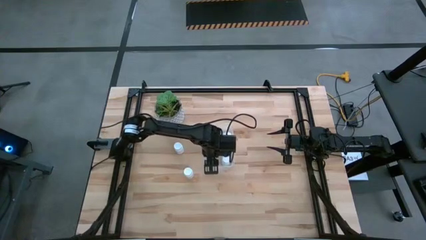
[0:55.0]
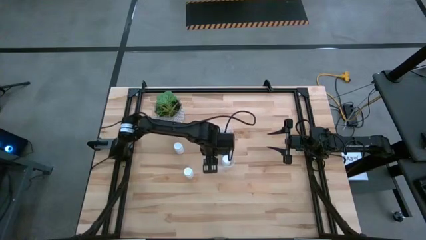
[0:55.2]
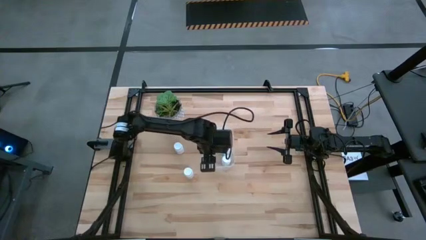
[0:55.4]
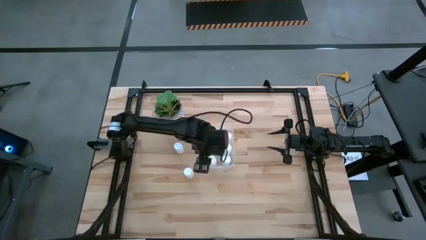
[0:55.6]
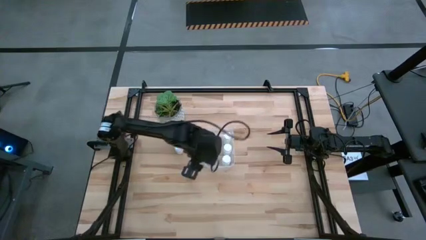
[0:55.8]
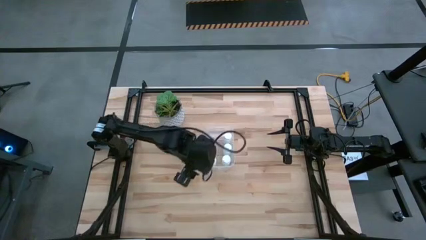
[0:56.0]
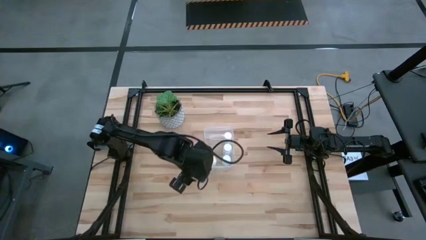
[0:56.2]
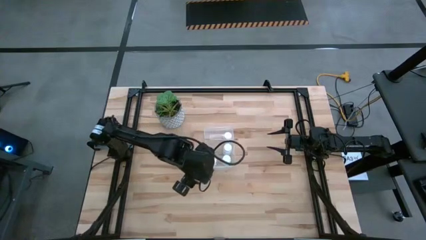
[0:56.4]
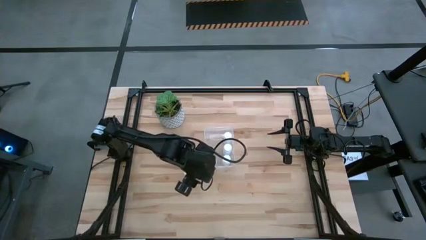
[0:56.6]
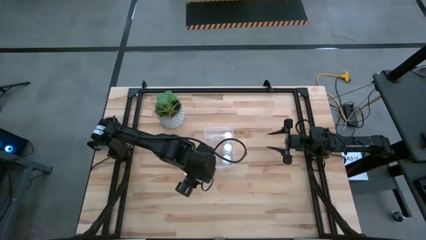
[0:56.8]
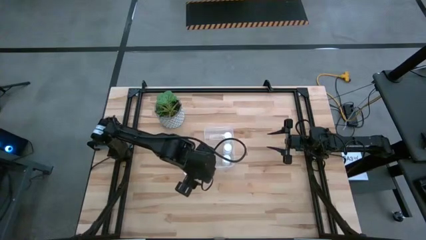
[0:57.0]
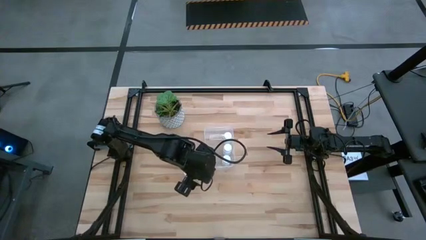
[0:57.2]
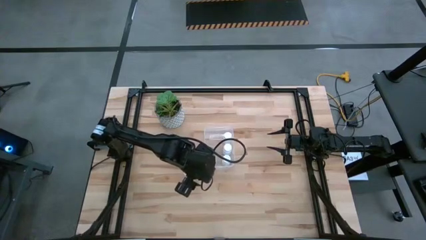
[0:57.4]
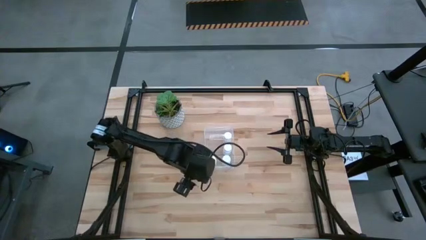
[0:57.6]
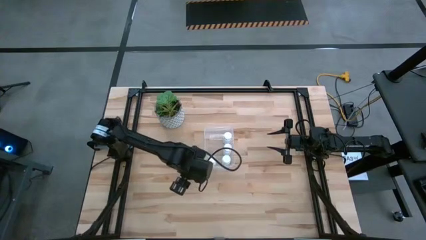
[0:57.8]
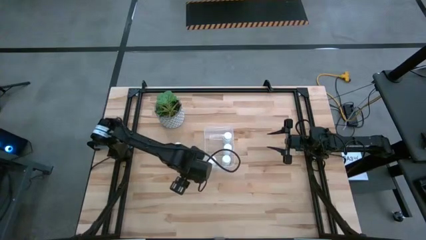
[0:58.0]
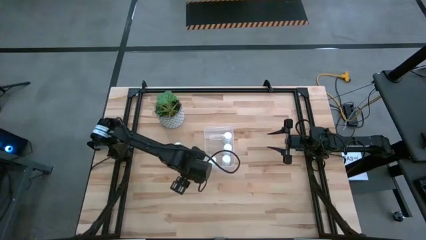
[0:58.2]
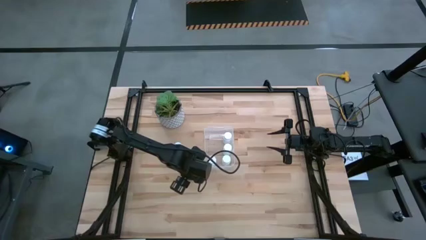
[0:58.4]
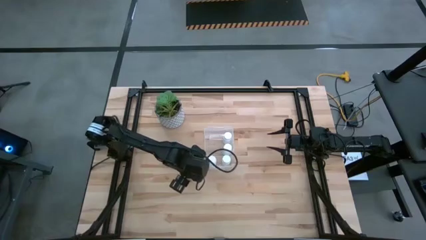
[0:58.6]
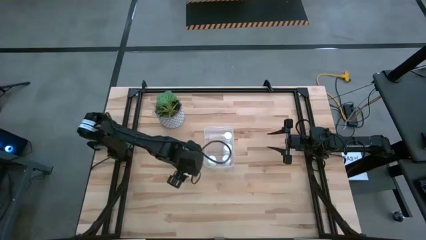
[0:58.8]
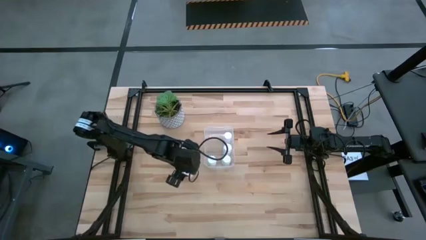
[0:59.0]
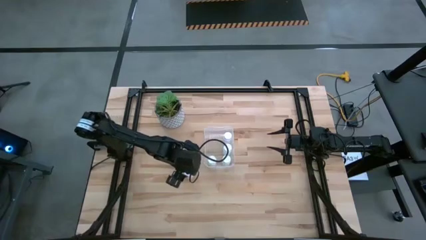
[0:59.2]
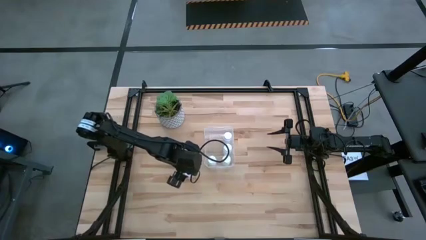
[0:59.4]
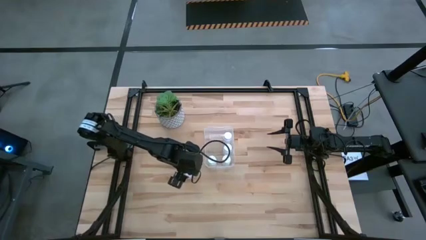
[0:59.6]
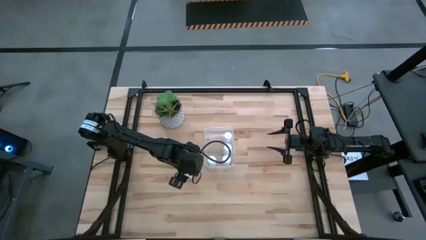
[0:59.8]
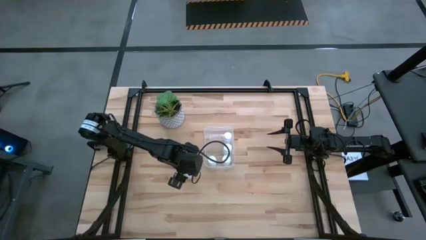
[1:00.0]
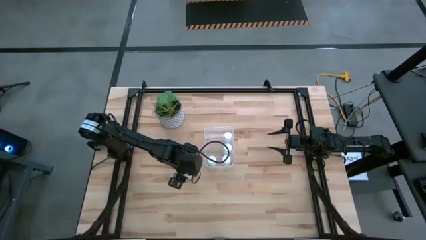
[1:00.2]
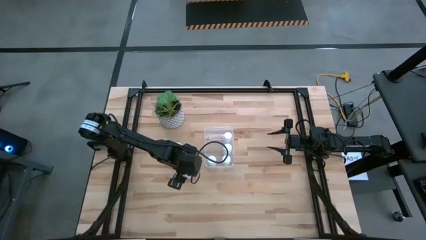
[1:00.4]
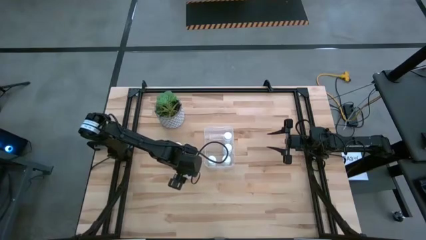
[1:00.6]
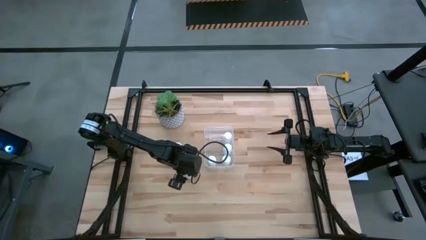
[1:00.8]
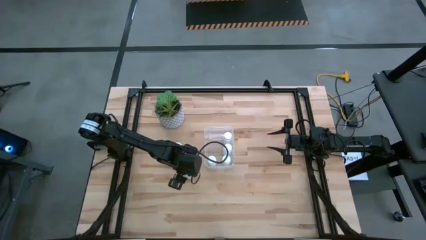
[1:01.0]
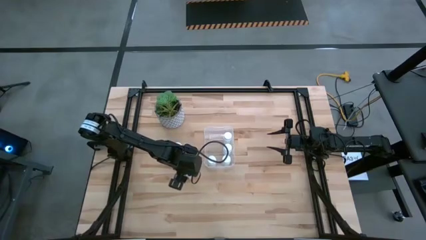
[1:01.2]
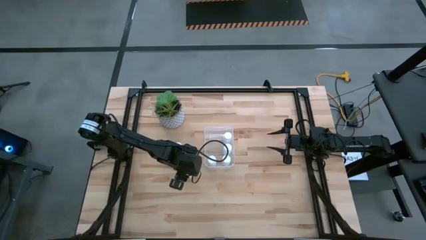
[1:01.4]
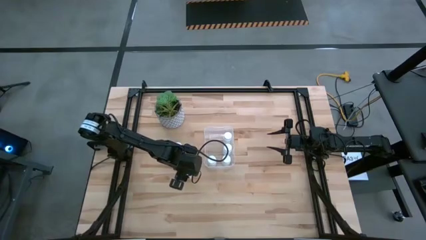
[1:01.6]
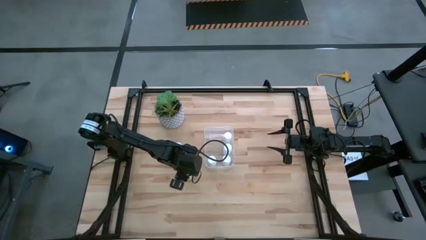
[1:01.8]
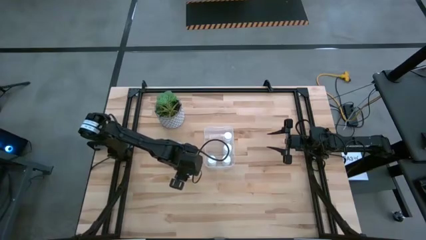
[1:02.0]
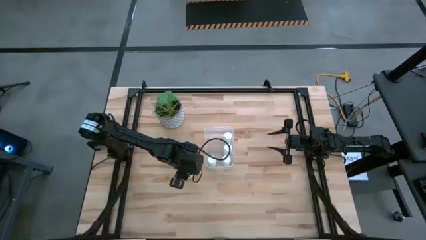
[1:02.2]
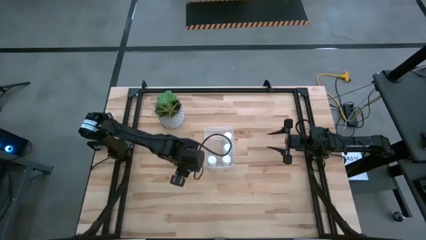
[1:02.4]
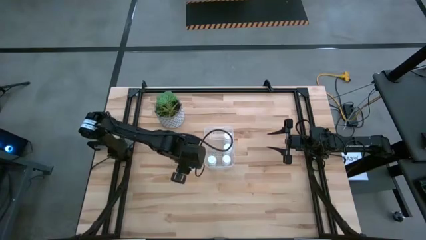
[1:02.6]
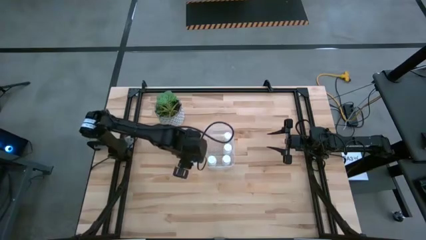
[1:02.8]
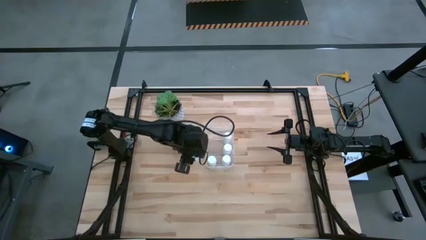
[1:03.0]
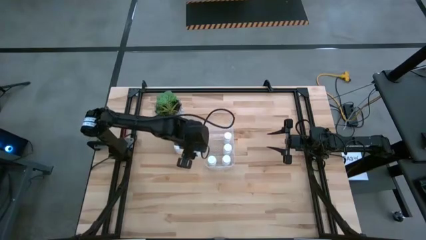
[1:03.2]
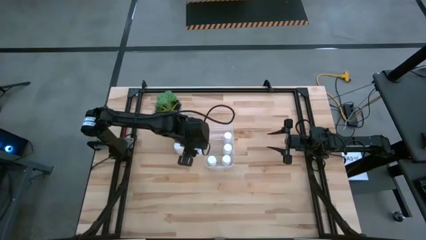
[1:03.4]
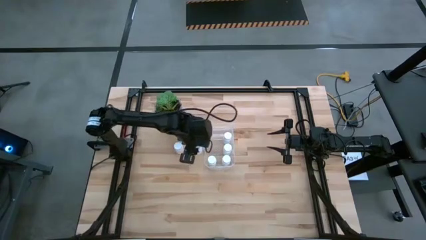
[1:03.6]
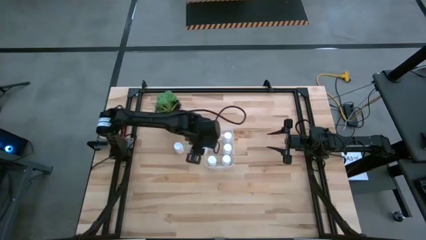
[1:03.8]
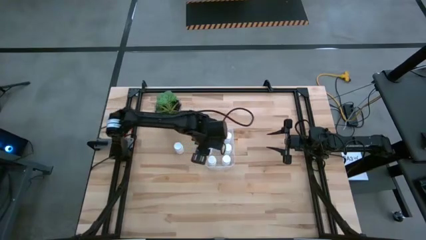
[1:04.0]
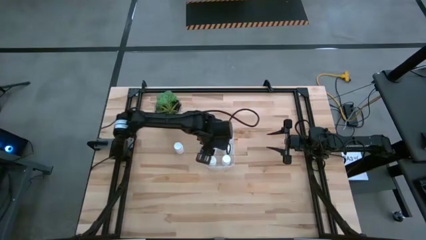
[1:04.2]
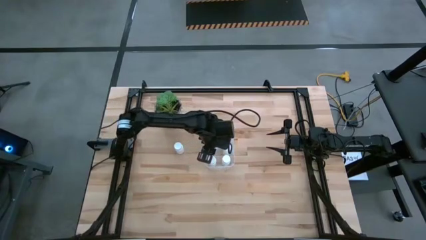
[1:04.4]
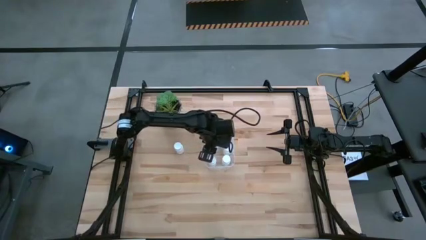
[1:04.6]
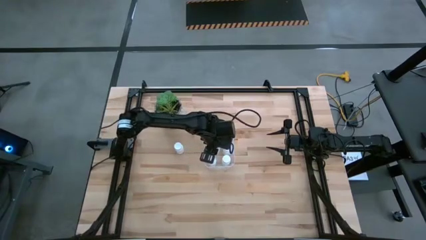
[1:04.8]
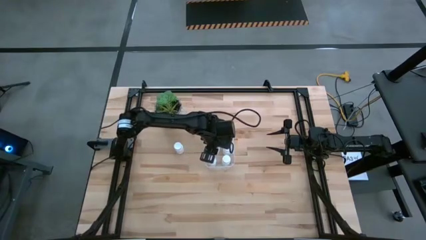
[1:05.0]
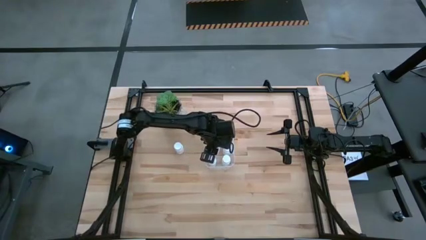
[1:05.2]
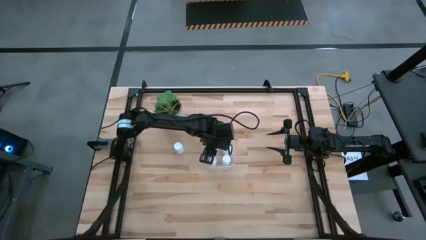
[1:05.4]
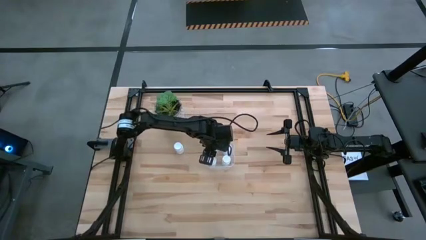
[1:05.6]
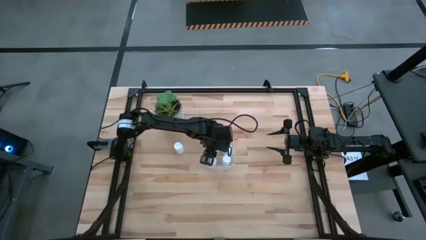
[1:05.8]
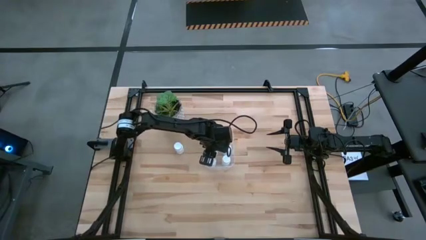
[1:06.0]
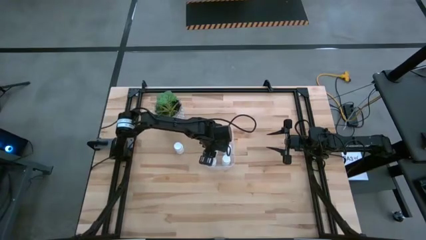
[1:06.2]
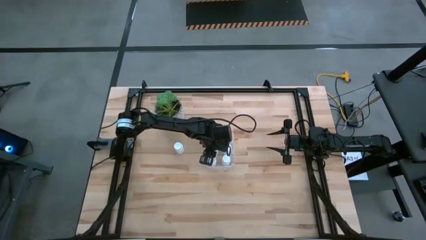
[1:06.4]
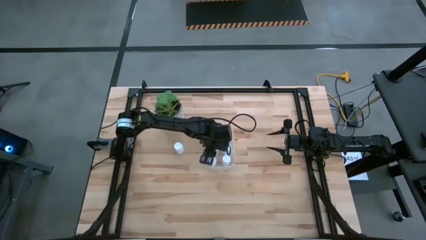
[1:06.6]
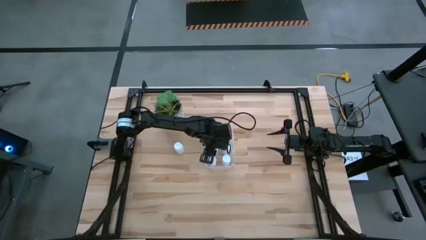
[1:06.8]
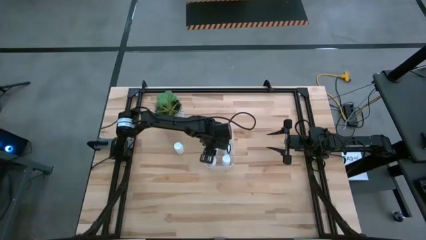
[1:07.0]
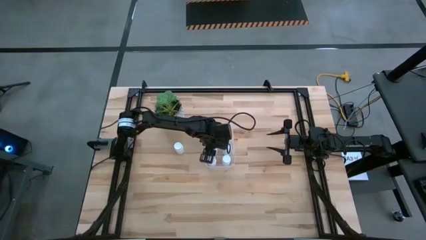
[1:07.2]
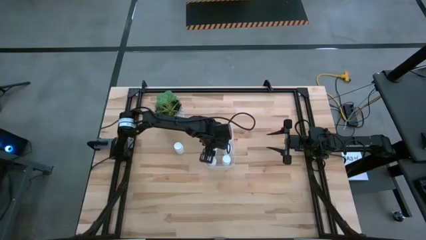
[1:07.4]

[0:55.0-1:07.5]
Task: Pick and place pill bottles into a basket
Put the white pill bottle into the transparent container

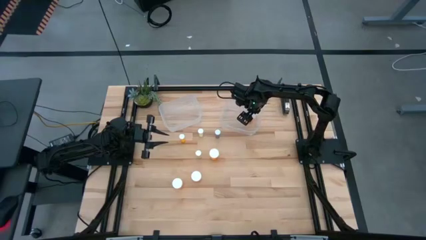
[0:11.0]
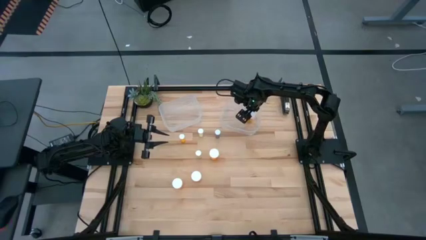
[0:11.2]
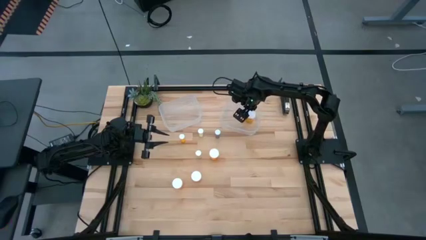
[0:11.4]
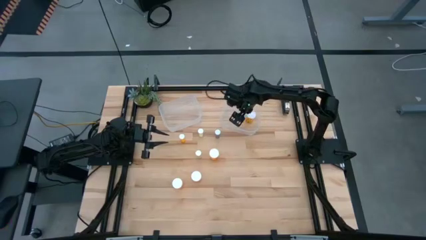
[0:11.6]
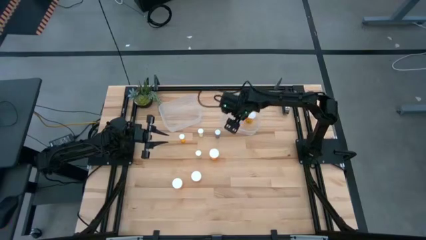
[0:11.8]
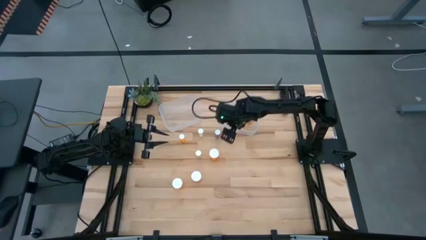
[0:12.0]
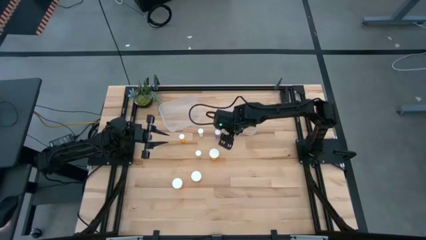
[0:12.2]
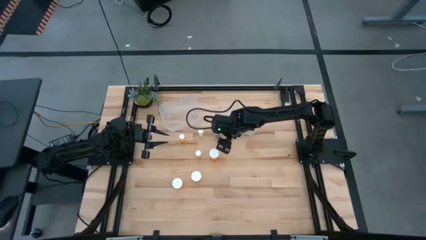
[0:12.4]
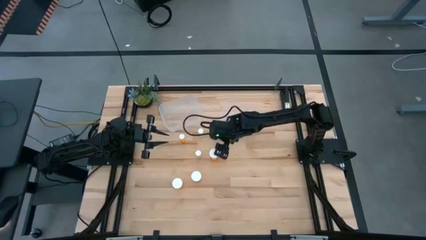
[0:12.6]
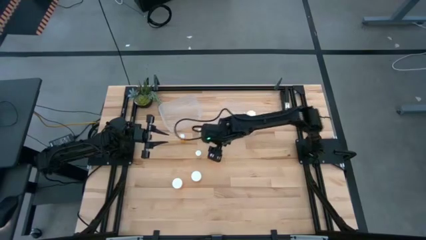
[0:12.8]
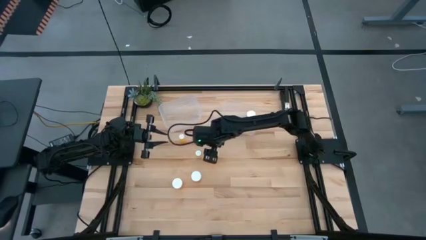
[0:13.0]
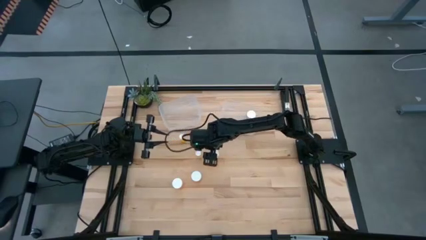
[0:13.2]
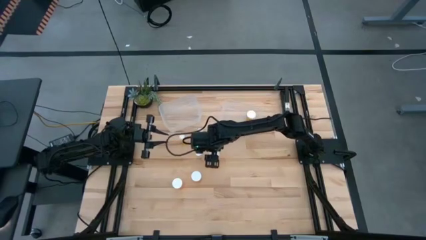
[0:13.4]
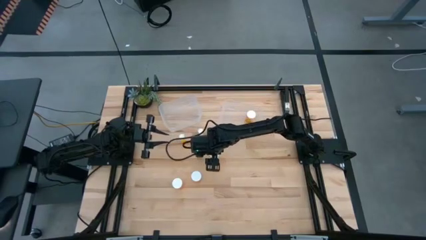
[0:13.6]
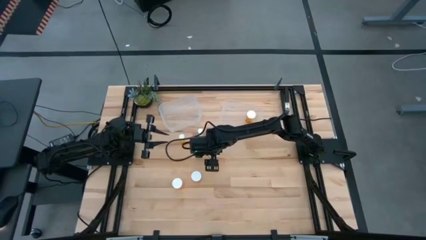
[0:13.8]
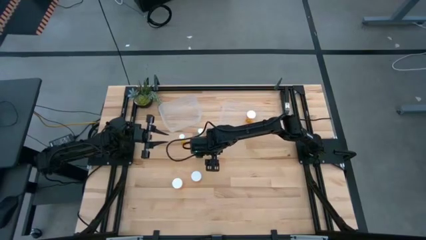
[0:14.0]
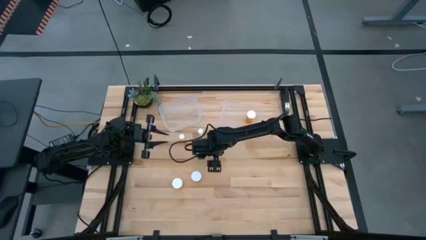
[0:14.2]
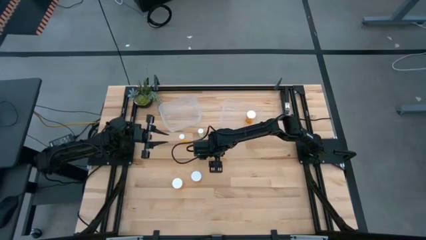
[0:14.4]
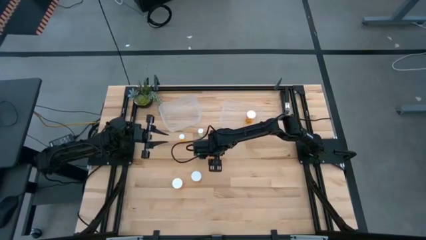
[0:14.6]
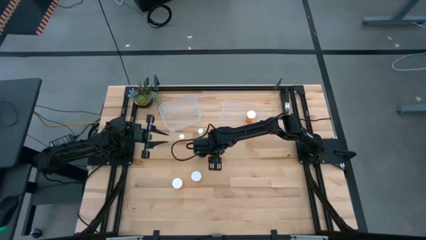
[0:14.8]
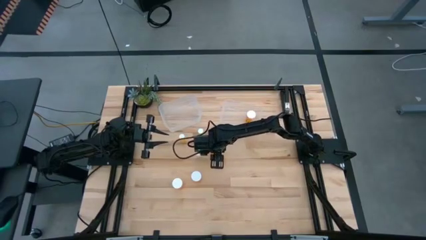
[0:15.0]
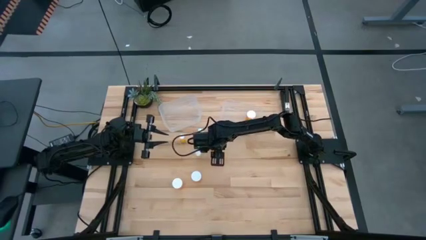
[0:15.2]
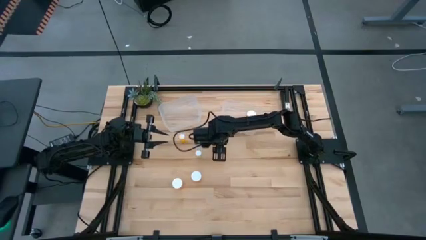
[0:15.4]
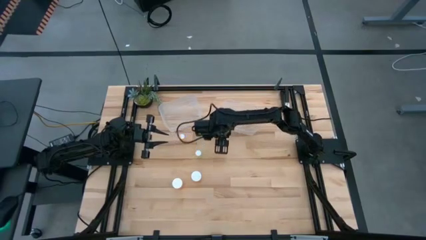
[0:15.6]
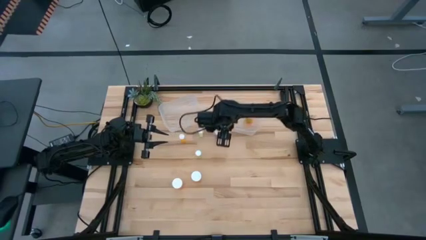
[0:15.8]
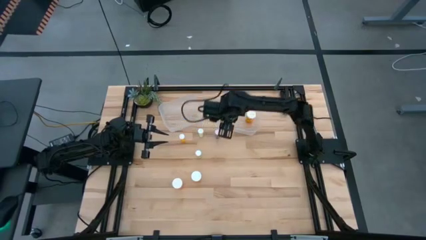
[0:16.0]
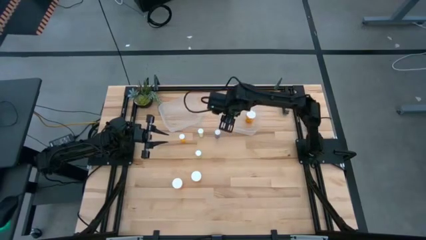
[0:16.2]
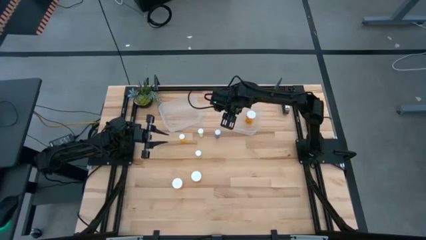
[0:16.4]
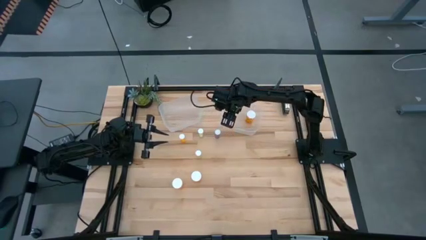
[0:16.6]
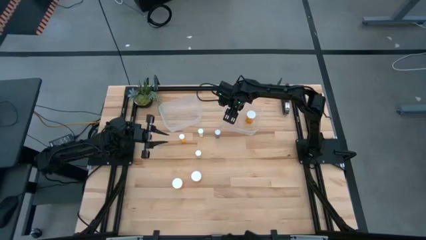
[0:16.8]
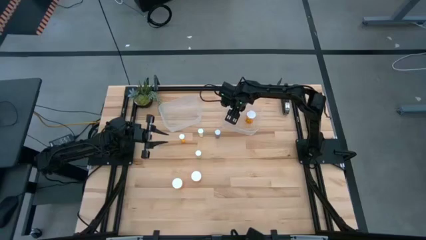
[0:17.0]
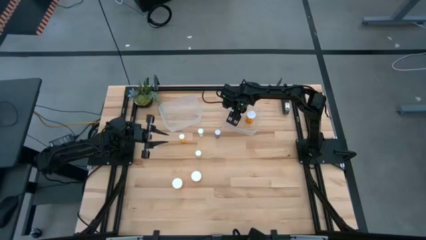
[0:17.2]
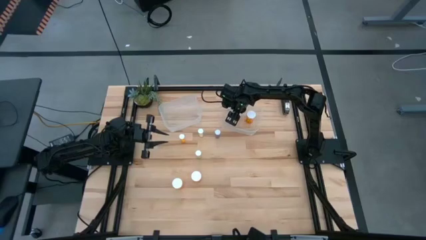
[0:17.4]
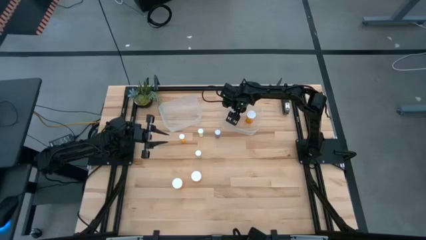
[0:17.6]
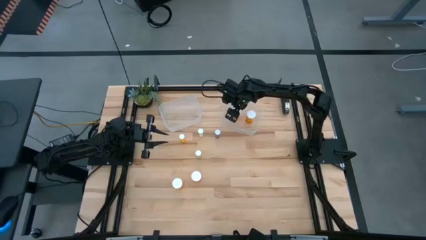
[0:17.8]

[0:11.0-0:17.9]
Task: Pick and place medicine bottles into bin by pill shape (circle, oval)
Put the orange pill bottle into the right bin
